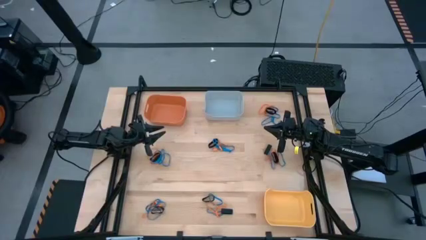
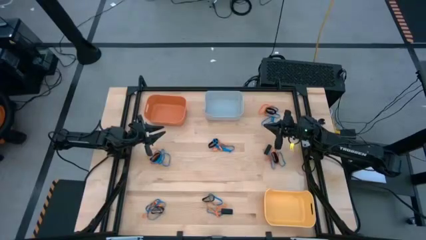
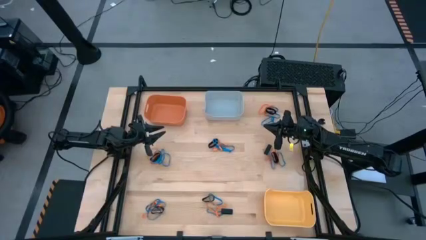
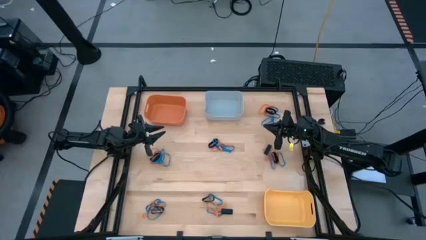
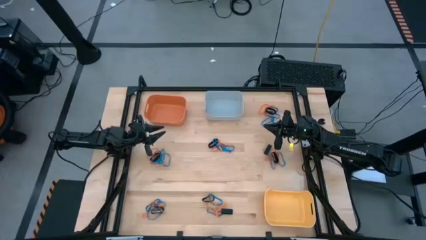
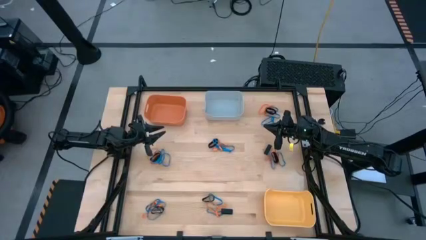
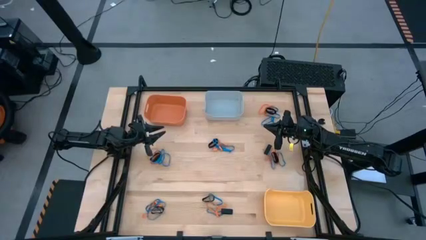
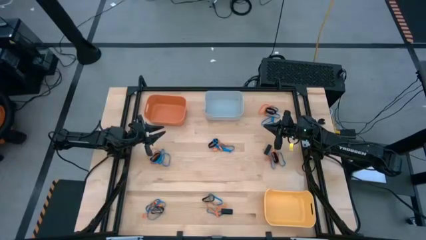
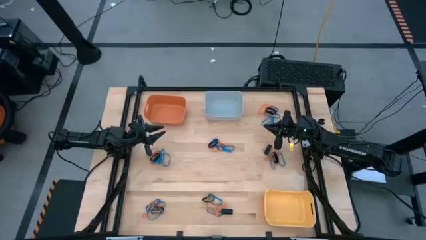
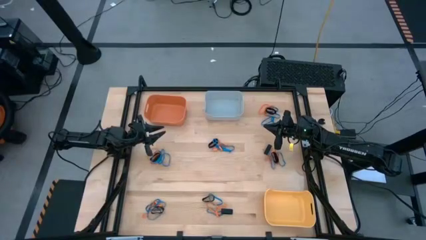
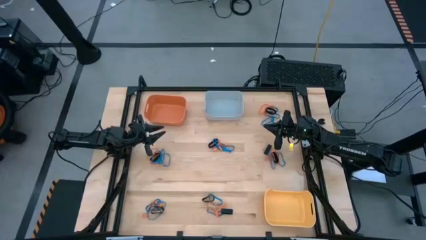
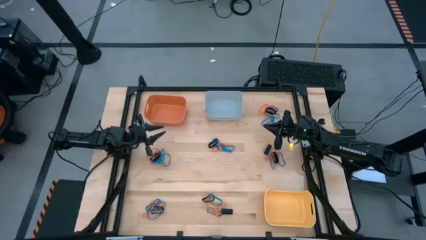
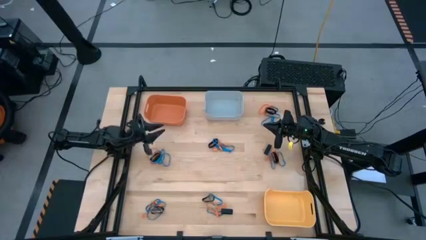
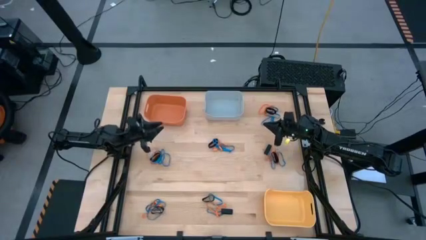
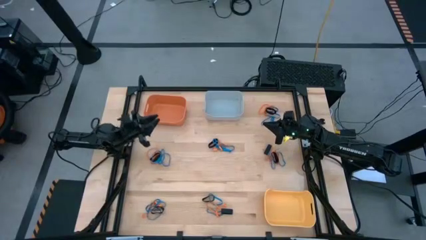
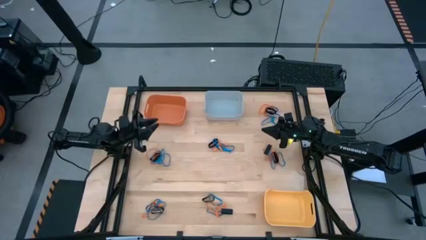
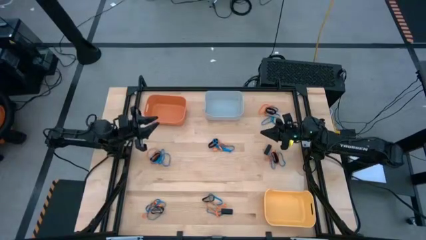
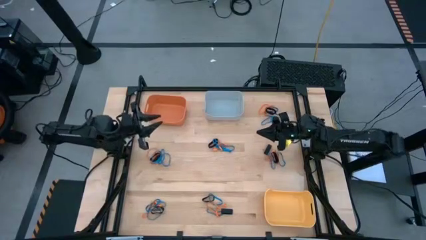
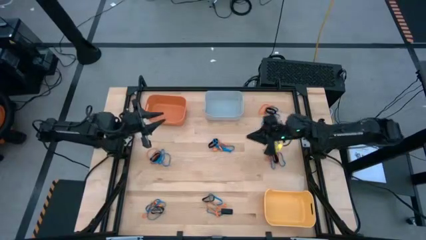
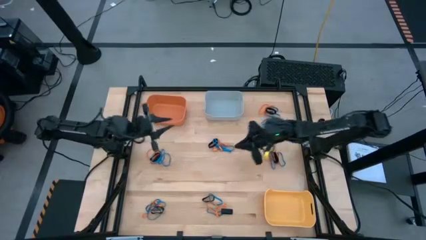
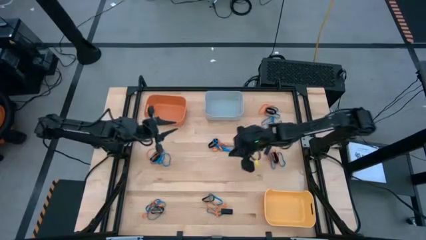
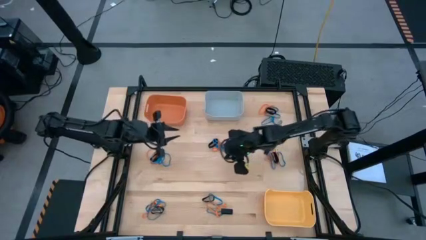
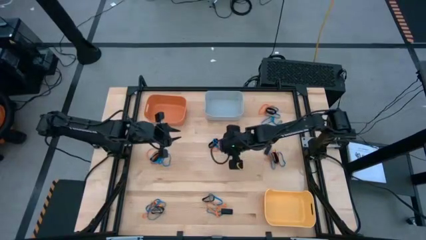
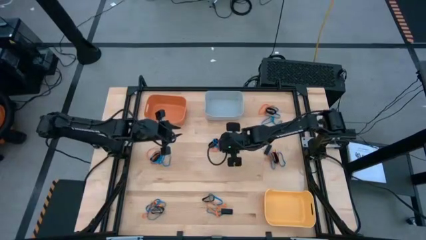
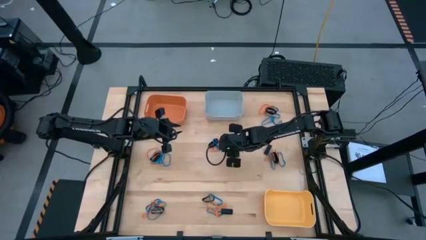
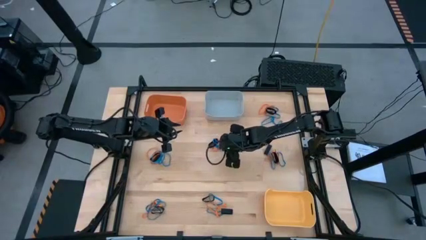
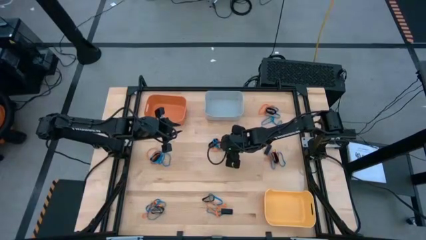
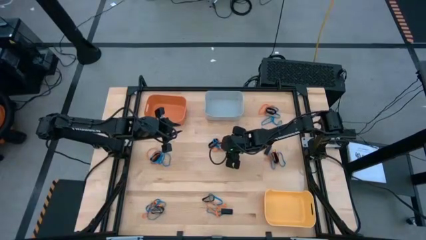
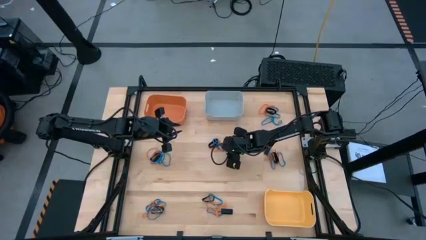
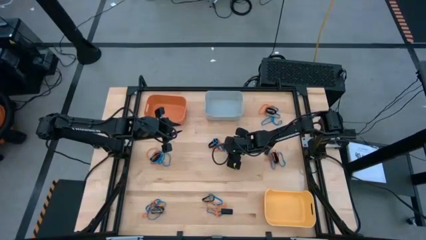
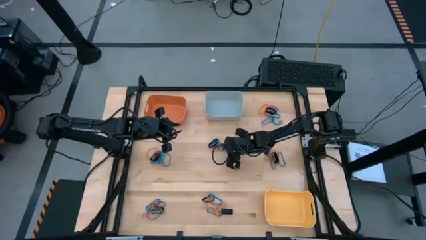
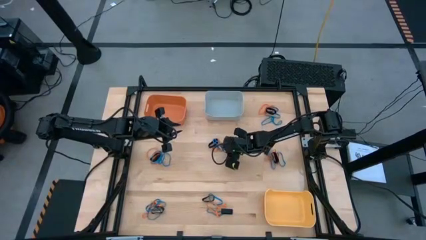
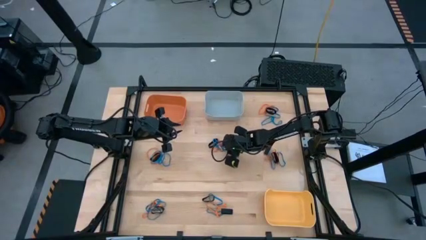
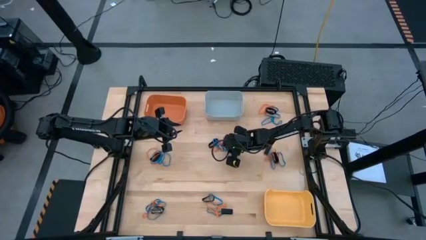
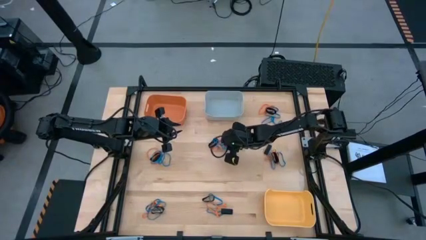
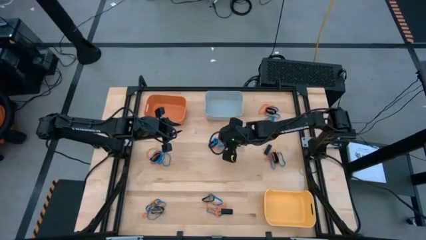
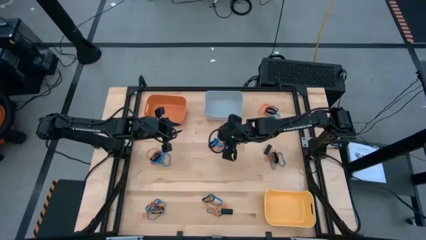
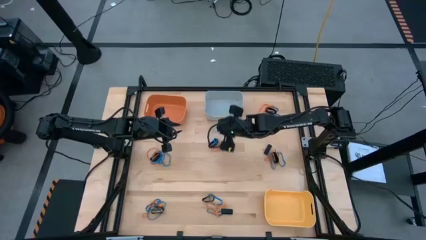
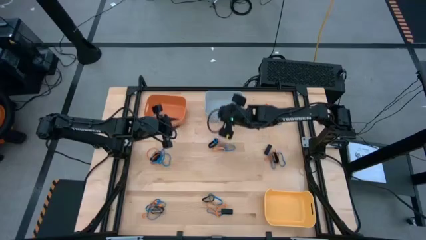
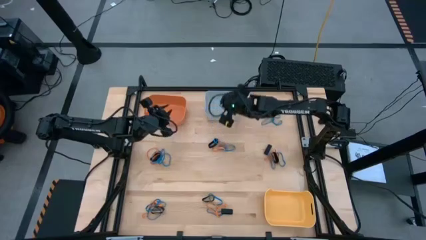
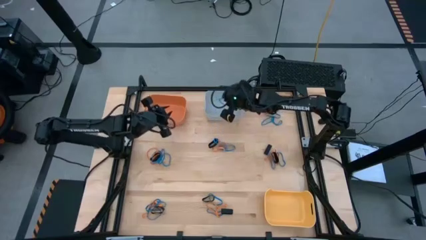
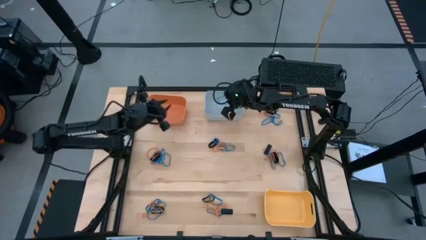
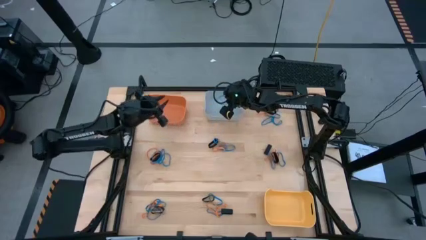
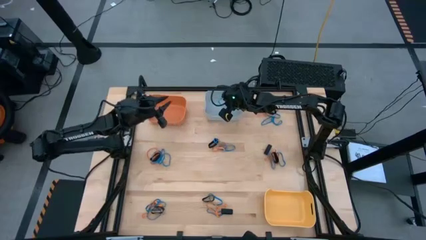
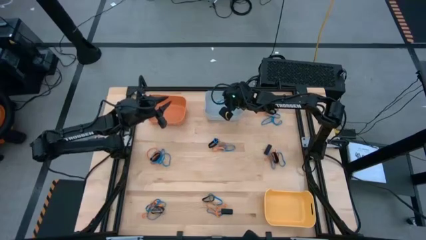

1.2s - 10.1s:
Task: Sort rubber bands into baskets
Put the blue rubberband into the gray bin

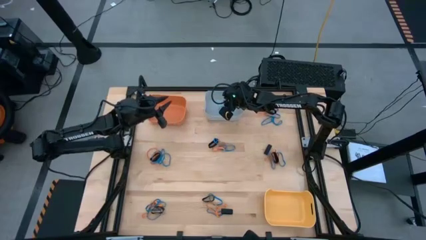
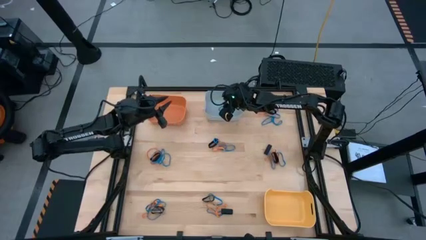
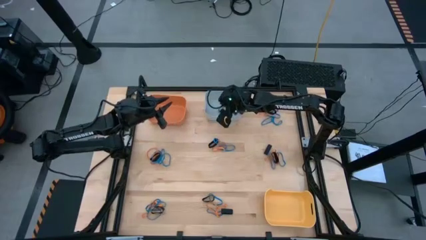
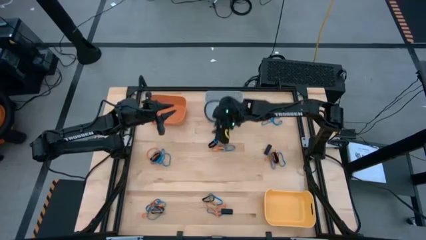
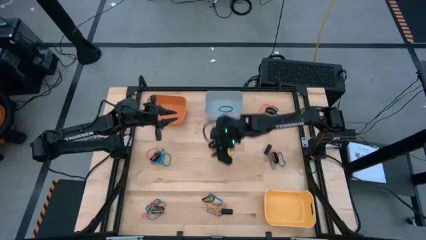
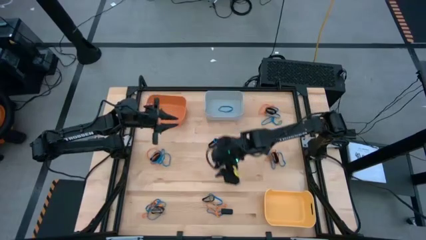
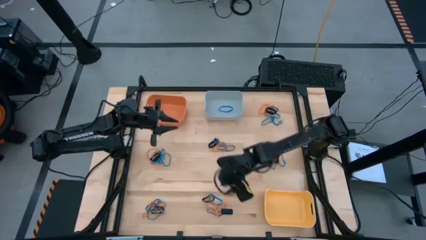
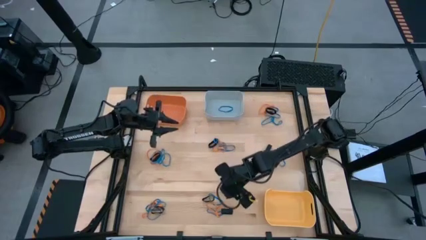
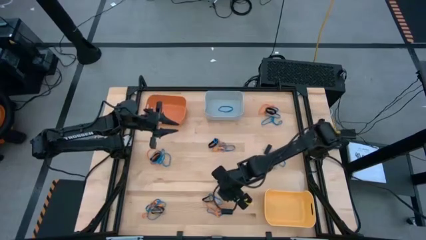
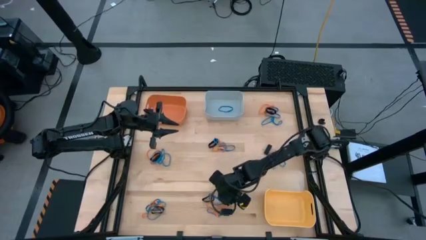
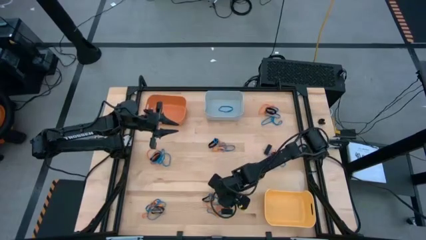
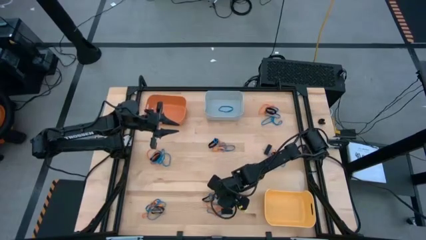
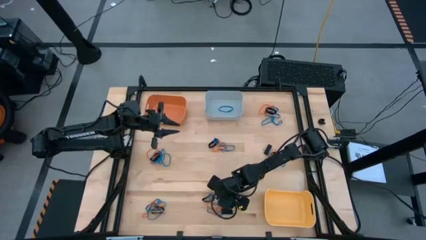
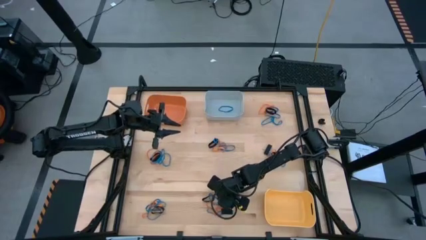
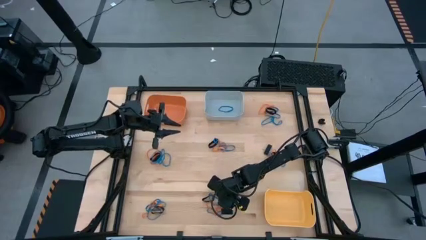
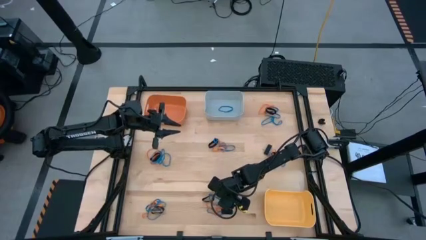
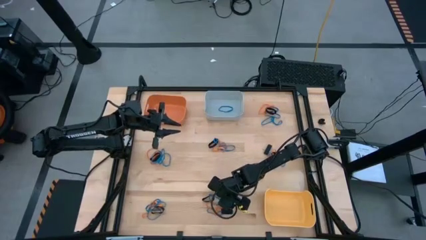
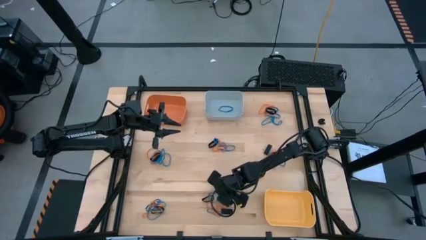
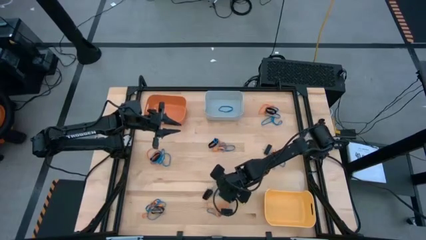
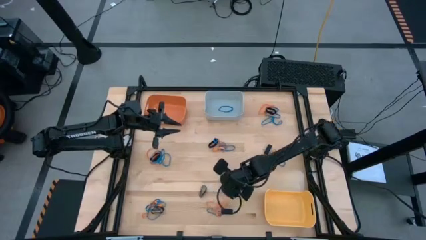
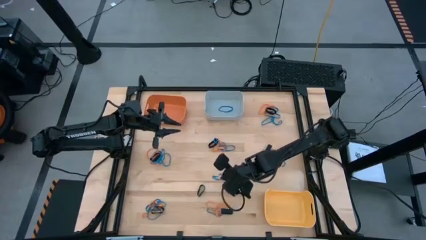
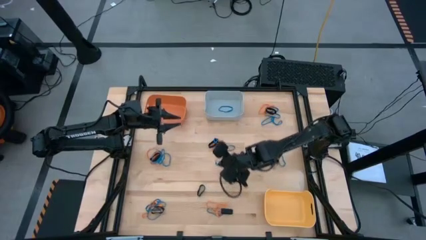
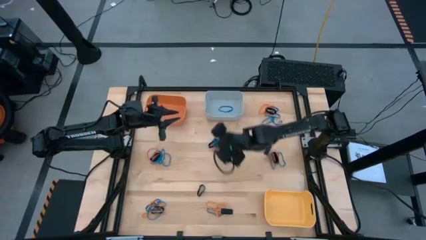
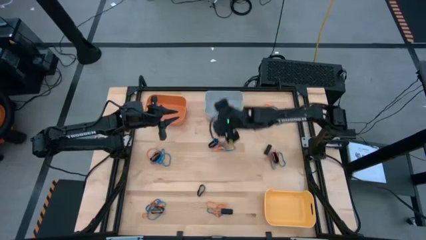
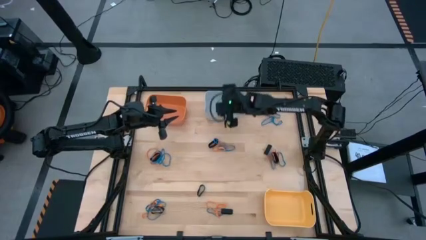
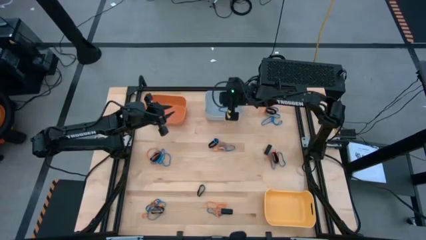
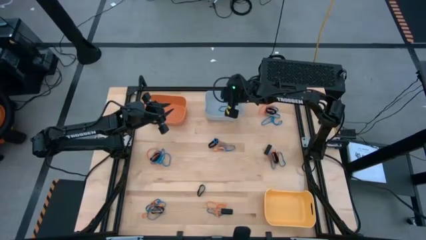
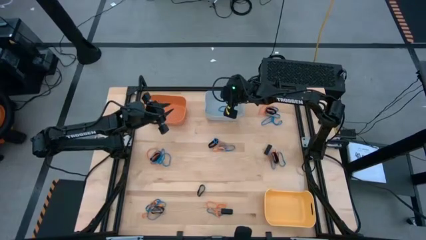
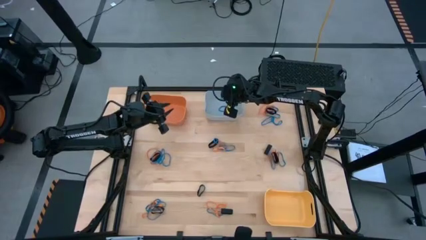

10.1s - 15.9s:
Put the blue rubberband into the gray bin

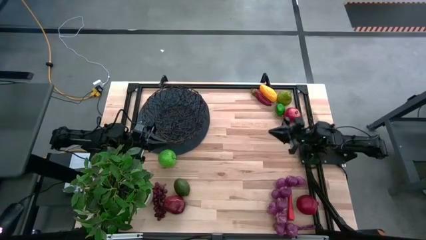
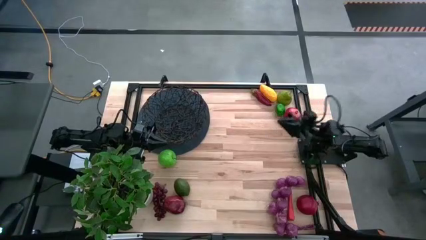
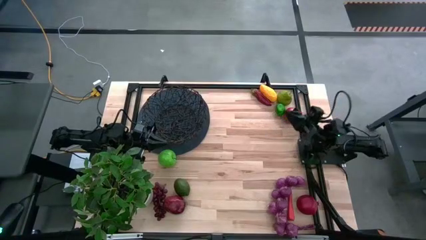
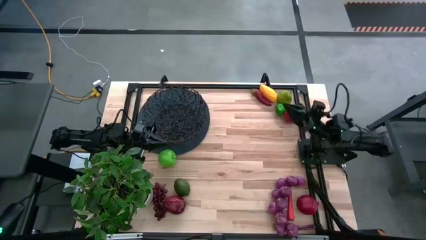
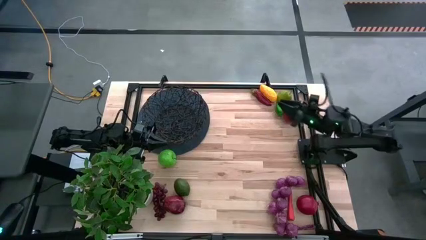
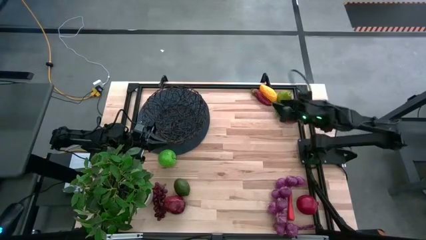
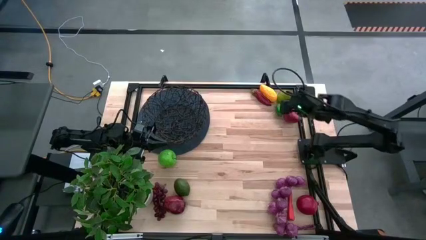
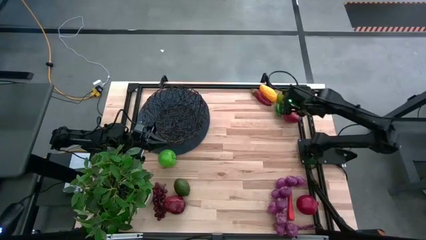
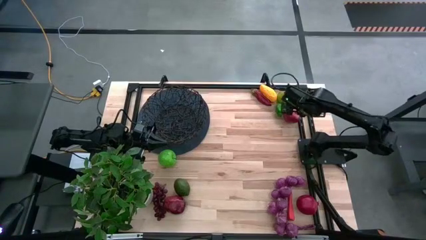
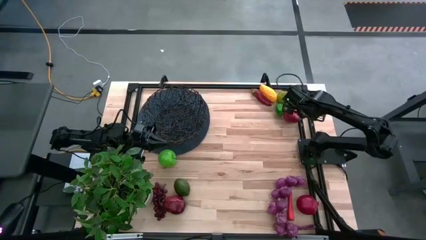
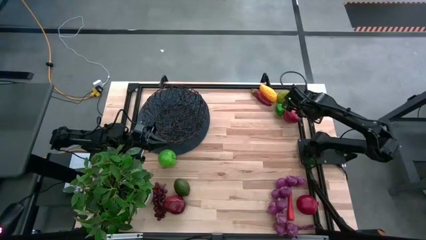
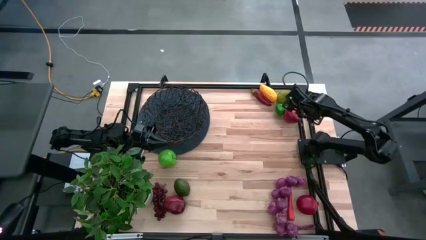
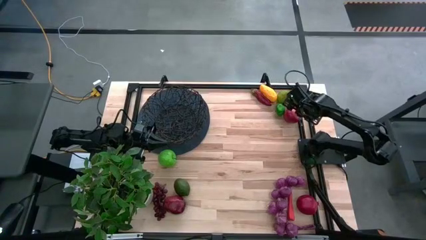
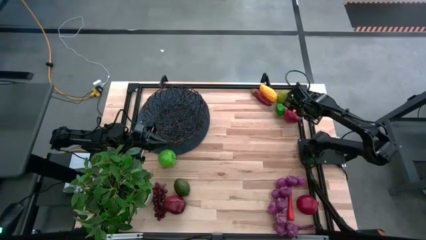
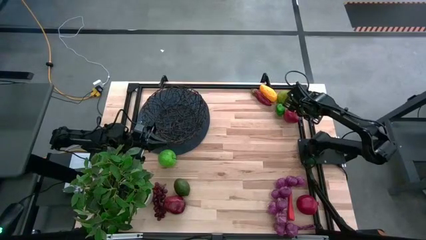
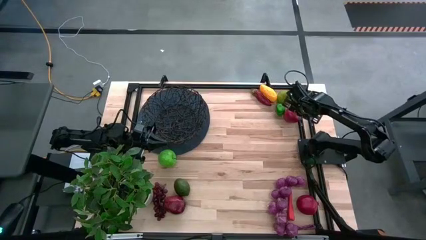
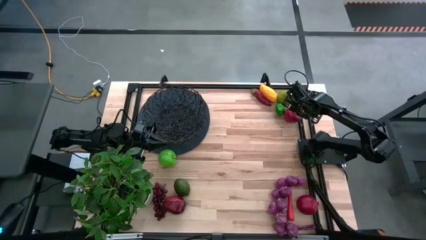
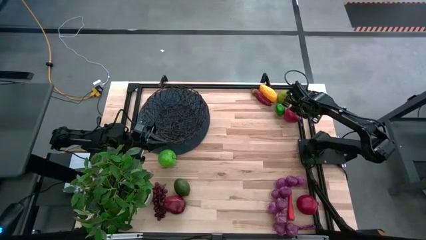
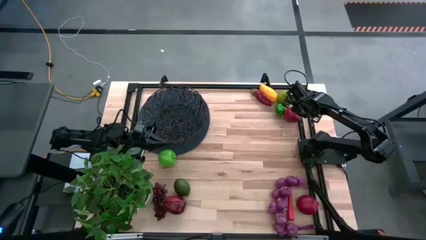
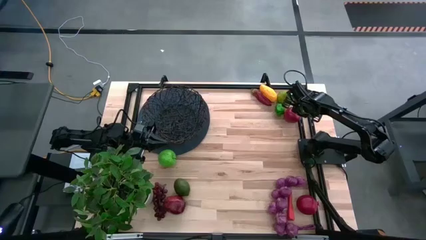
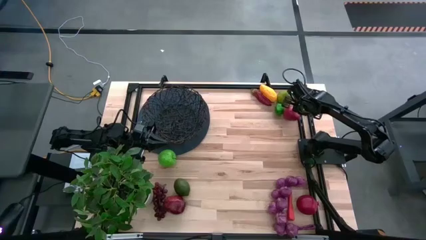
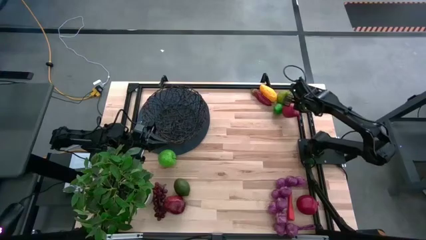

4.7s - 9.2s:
Task: Build produce basket
Put the top pomegranate into the wire basket
